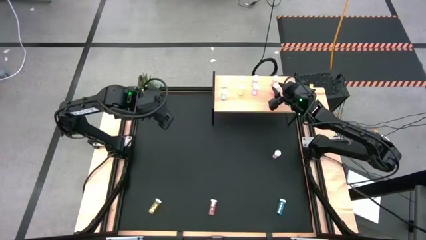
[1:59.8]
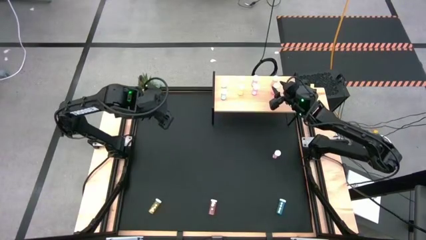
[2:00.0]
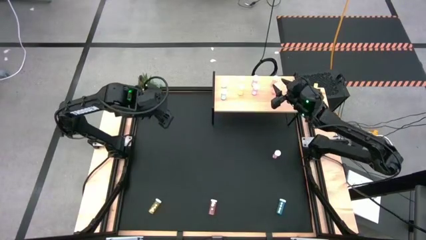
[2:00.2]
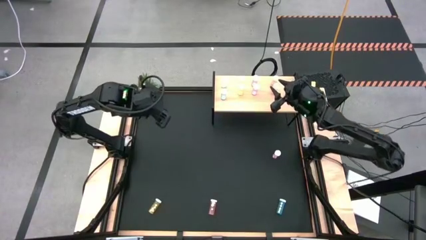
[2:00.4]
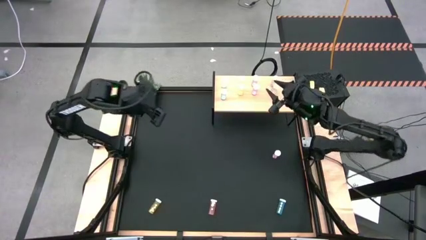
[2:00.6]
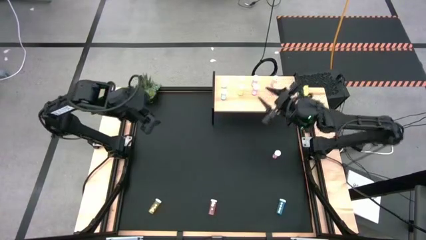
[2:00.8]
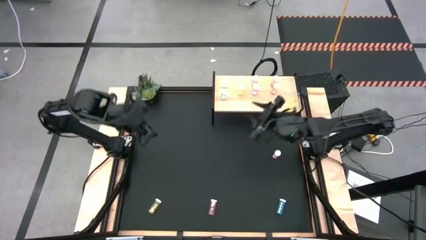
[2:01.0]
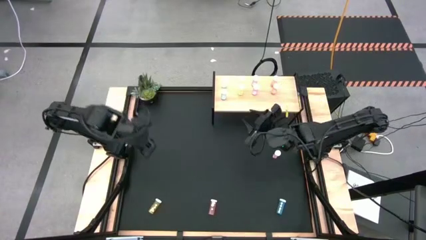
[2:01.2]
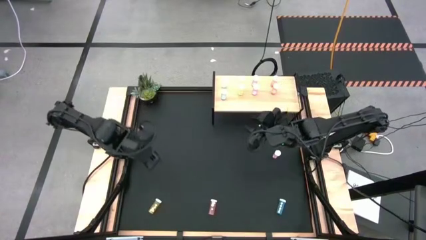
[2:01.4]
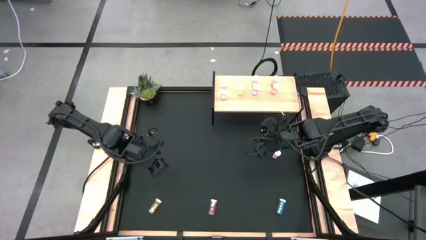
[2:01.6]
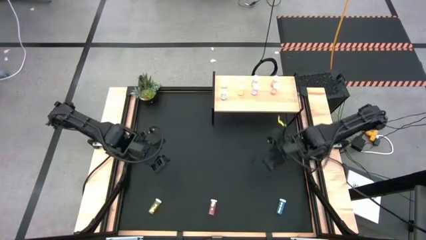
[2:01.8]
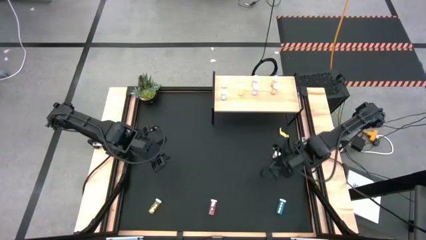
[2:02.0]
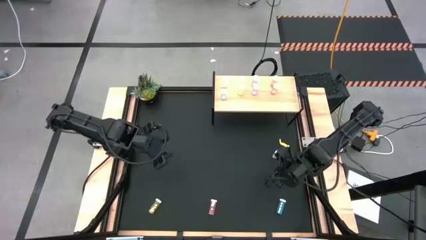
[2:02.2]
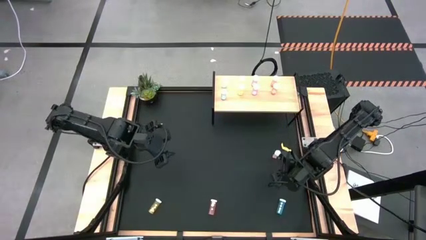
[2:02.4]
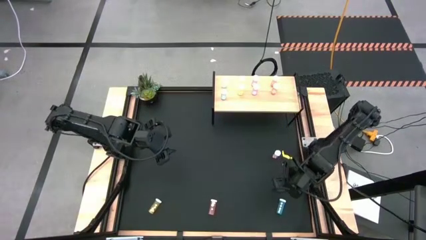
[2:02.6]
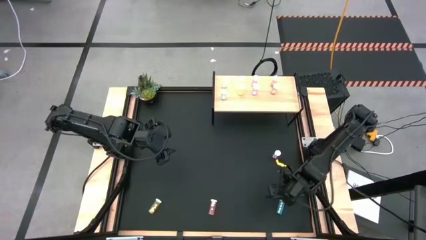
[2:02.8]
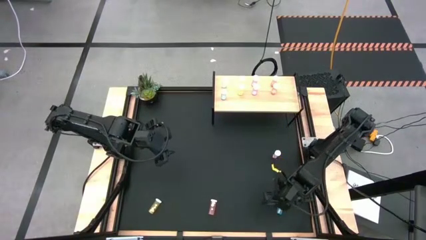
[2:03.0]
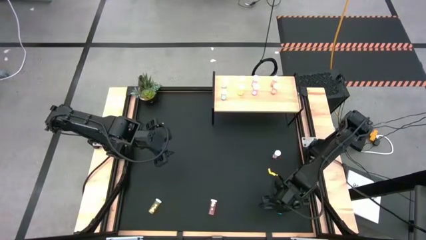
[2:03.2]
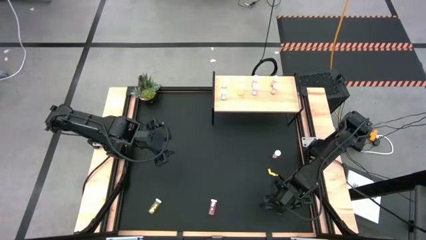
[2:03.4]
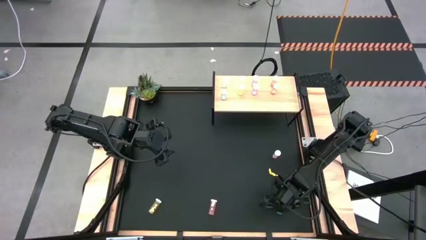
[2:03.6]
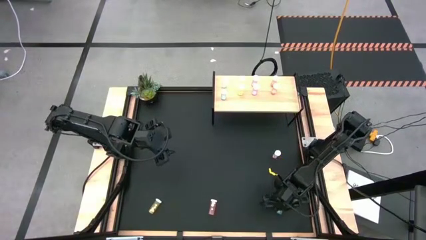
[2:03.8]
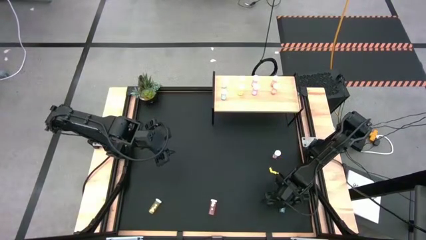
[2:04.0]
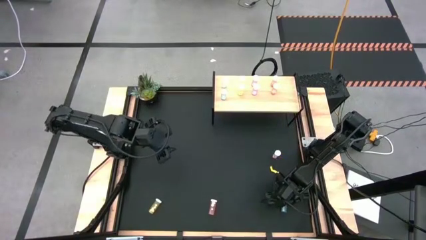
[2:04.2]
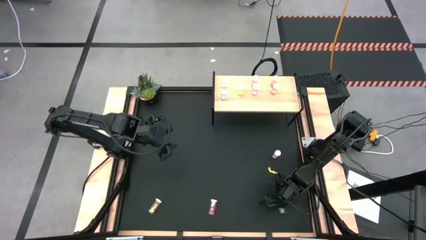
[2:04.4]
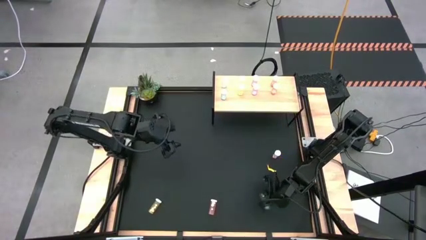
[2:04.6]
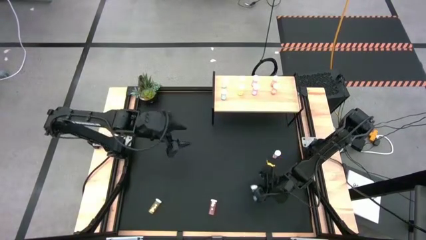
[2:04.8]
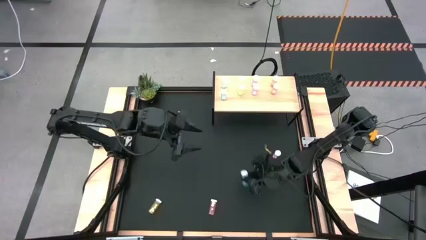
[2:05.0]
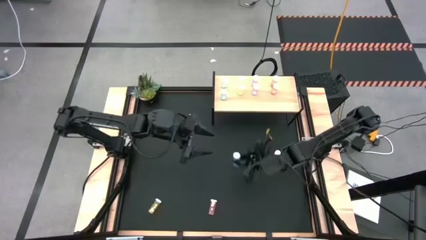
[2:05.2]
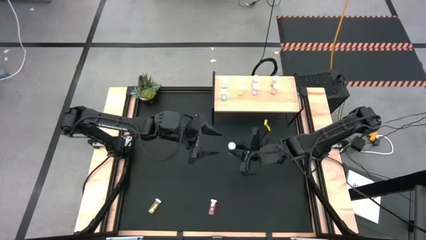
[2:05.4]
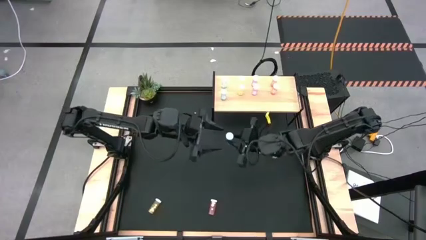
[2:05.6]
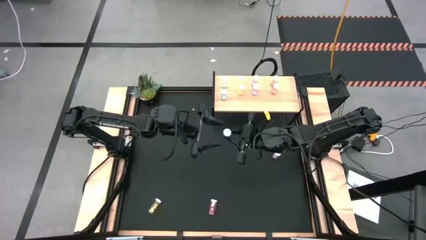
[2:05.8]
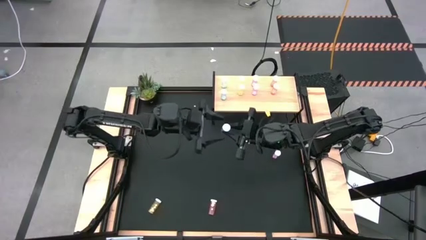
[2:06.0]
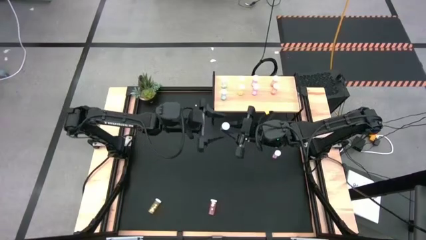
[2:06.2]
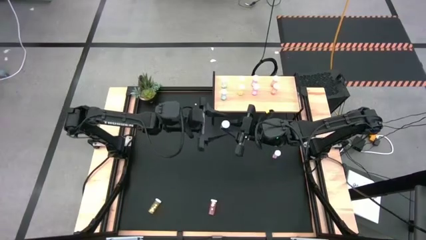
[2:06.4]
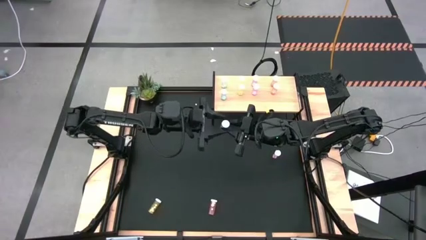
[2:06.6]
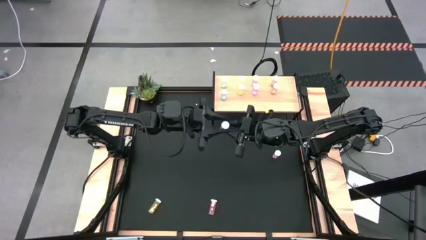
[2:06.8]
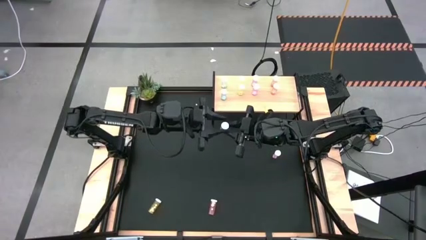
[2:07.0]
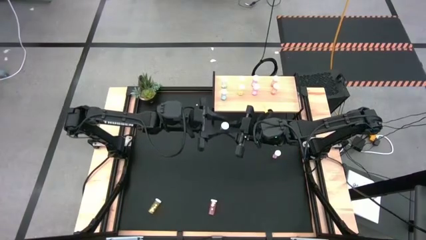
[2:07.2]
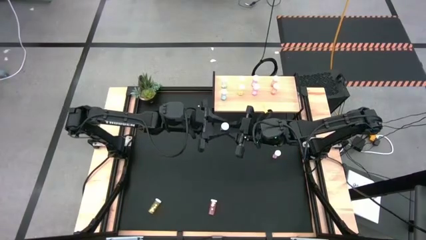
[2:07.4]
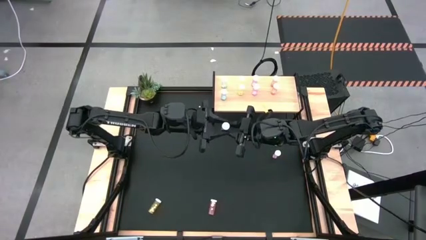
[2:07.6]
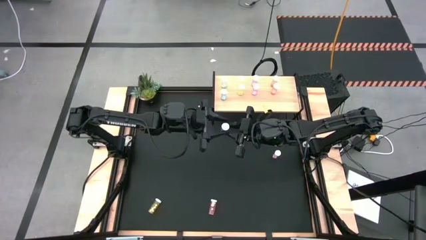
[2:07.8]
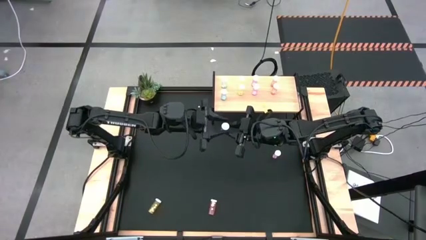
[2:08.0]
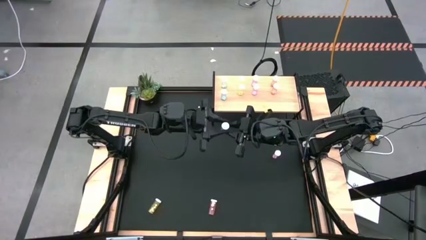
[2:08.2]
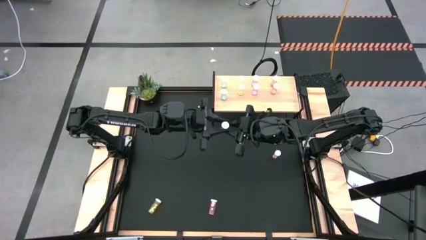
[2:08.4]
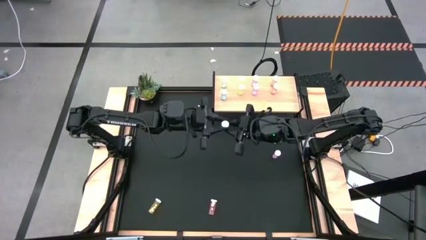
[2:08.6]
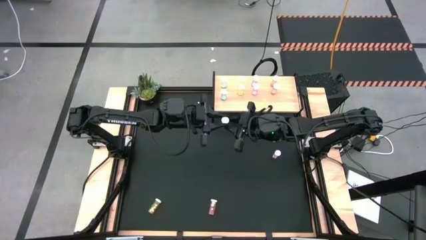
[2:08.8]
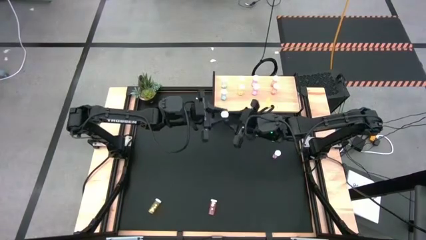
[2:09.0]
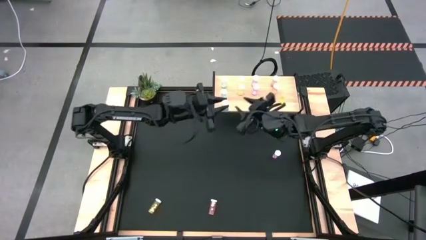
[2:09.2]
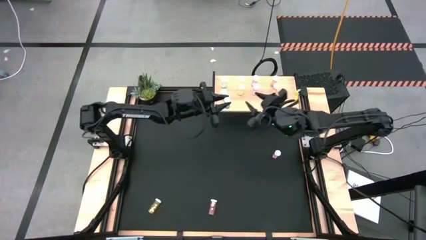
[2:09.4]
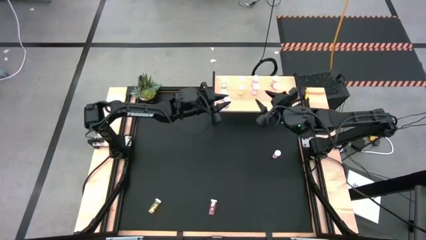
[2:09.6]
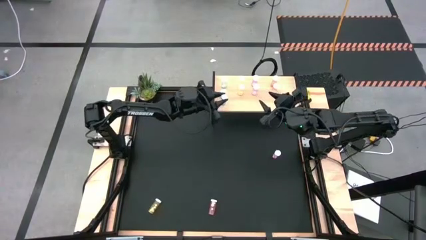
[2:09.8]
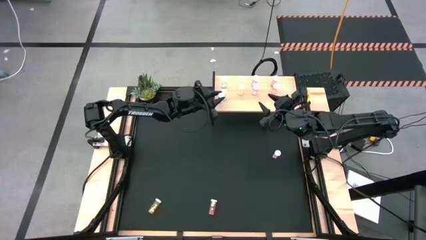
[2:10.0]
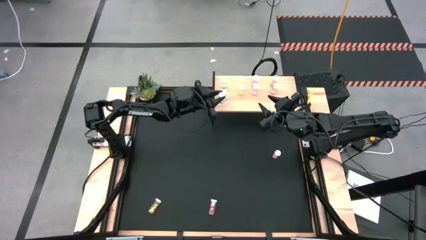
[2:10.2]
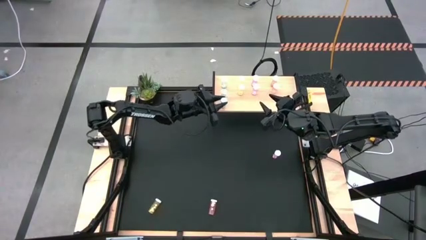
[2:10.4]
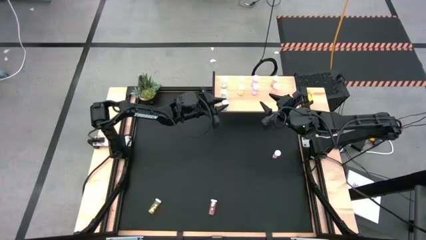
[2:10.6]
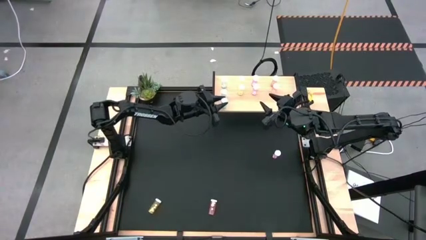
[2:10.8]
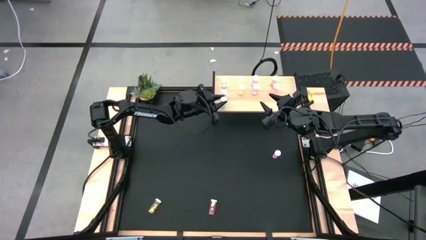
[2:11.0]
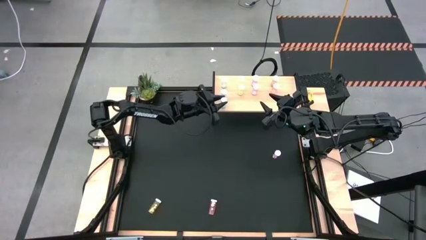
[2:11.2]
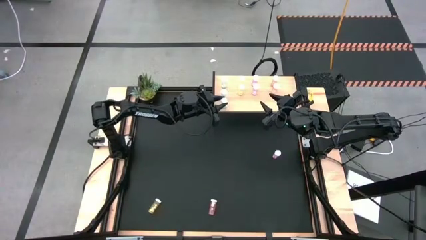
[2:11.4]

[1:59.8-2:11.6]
Task: Pick and place medicine bottles onto shelf by color
Put the blue pill bottle on the shelf aligned with the other blue pill bottles
